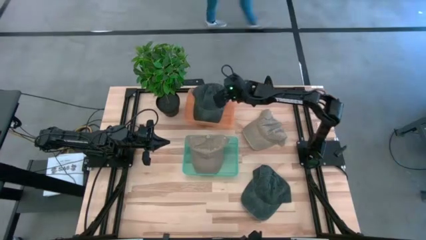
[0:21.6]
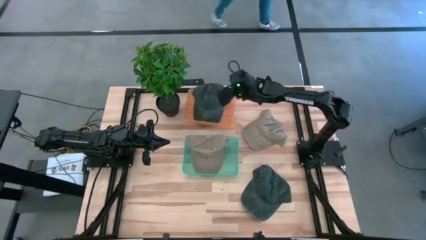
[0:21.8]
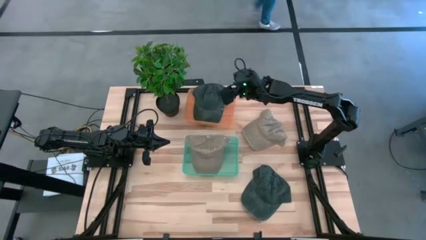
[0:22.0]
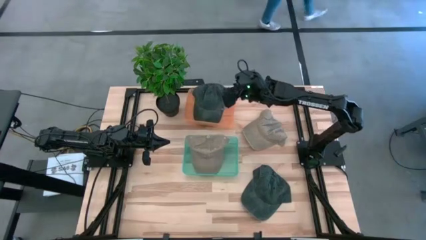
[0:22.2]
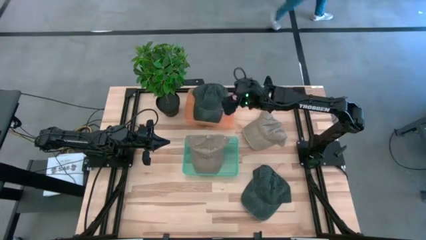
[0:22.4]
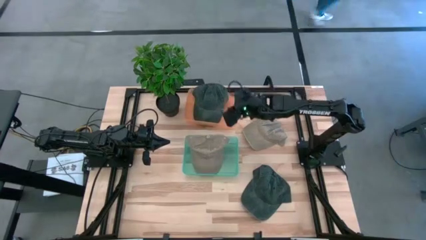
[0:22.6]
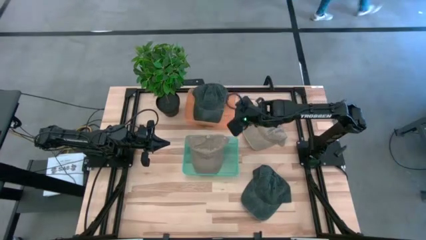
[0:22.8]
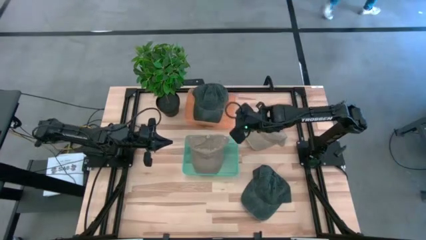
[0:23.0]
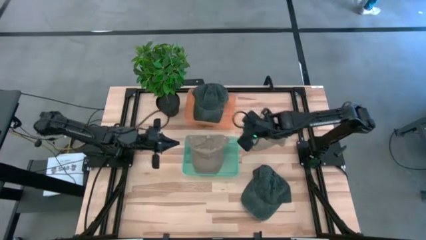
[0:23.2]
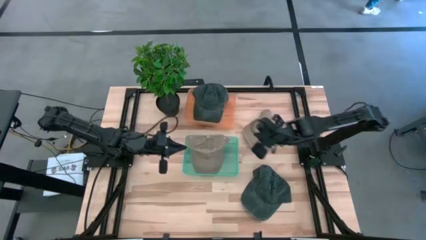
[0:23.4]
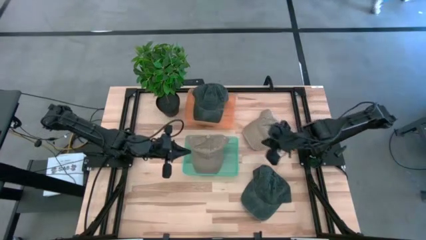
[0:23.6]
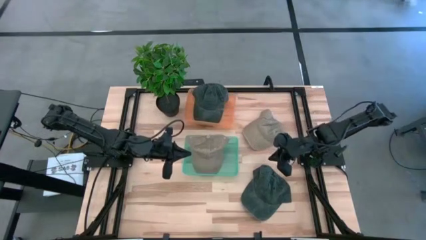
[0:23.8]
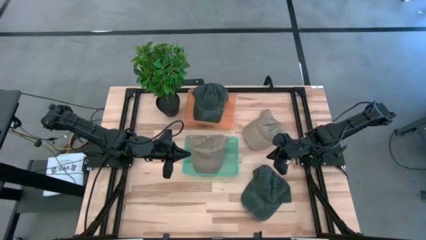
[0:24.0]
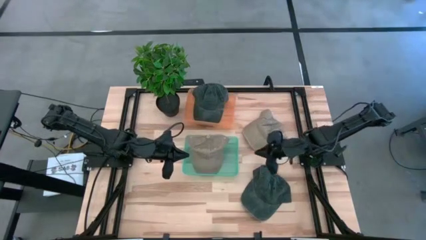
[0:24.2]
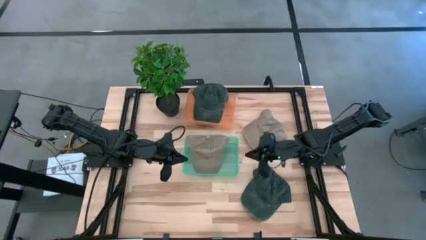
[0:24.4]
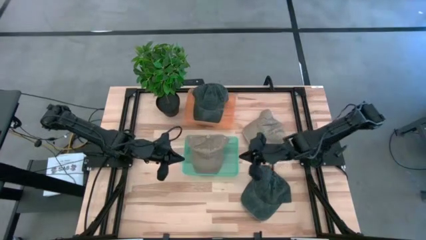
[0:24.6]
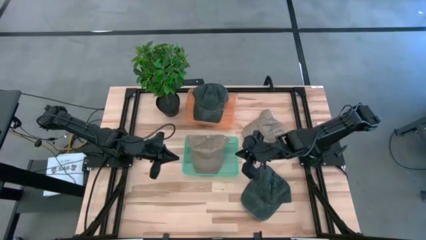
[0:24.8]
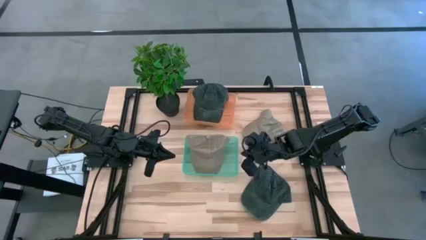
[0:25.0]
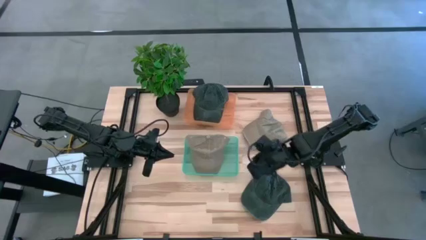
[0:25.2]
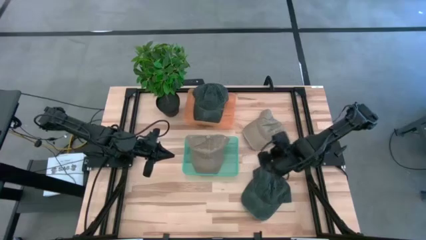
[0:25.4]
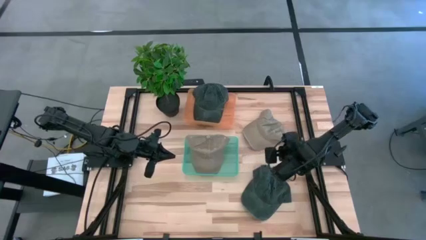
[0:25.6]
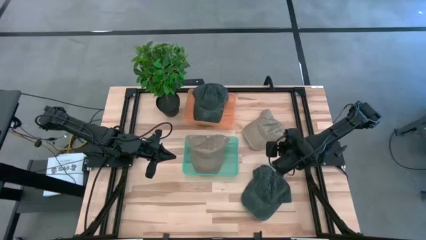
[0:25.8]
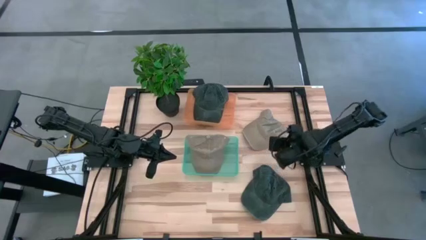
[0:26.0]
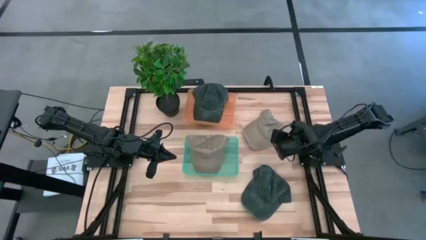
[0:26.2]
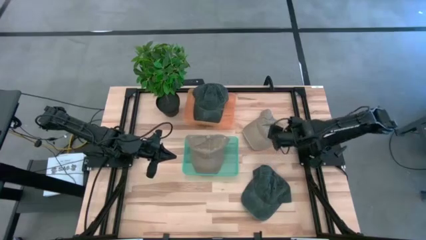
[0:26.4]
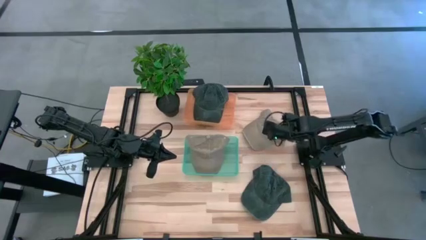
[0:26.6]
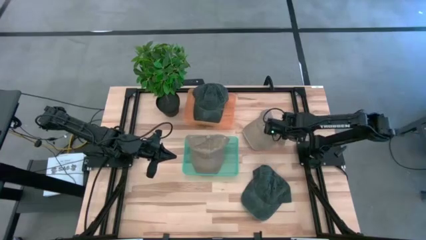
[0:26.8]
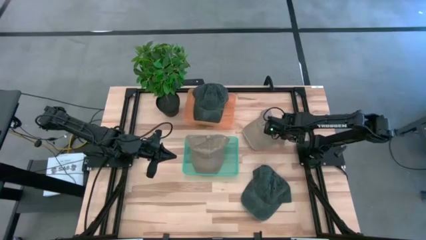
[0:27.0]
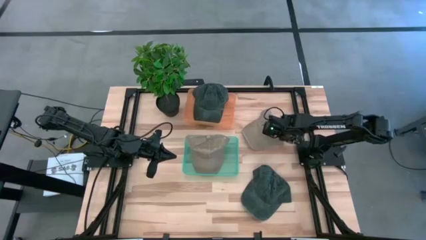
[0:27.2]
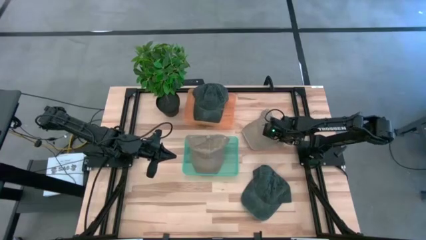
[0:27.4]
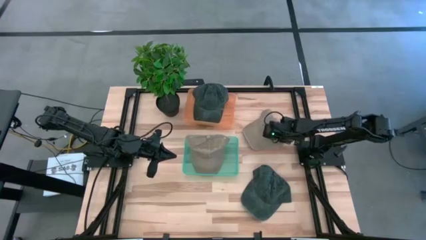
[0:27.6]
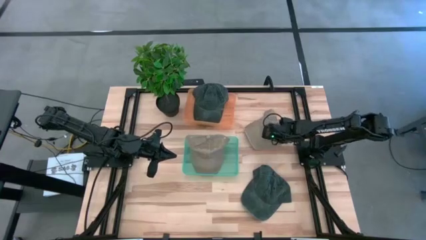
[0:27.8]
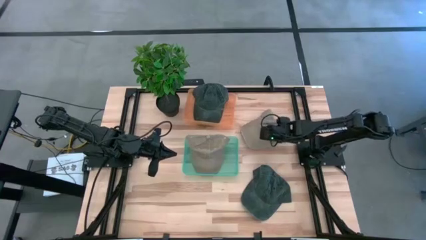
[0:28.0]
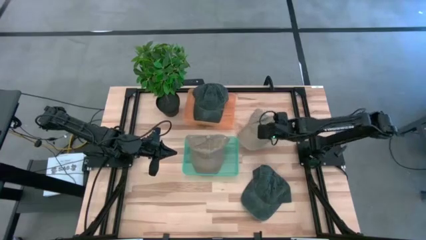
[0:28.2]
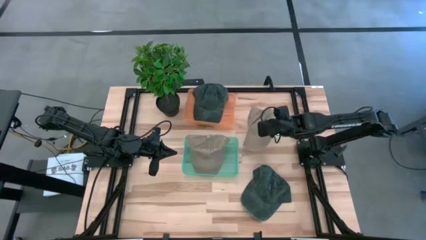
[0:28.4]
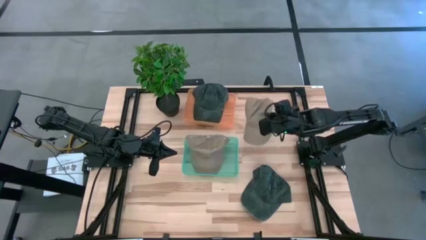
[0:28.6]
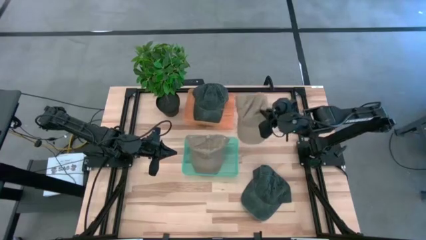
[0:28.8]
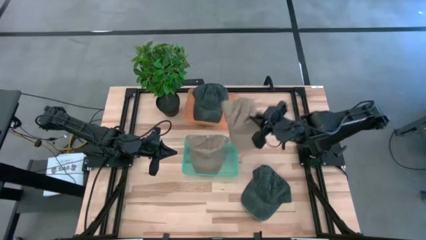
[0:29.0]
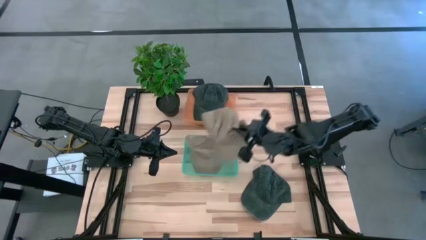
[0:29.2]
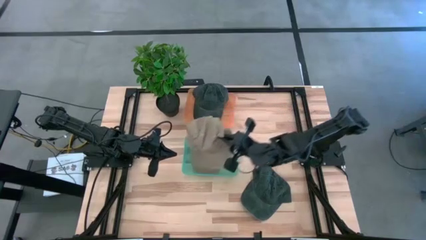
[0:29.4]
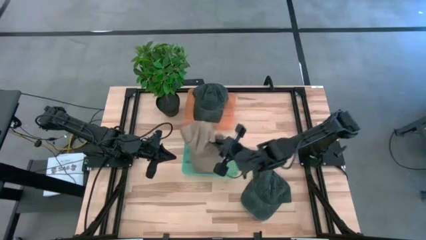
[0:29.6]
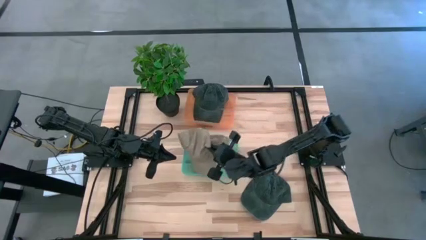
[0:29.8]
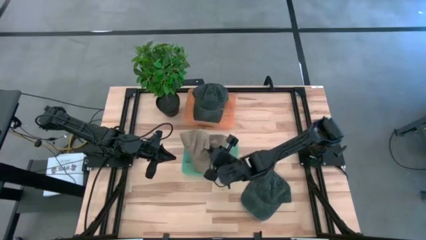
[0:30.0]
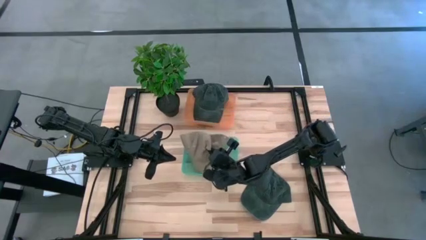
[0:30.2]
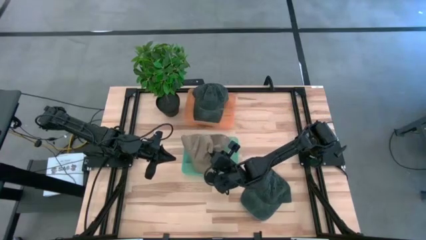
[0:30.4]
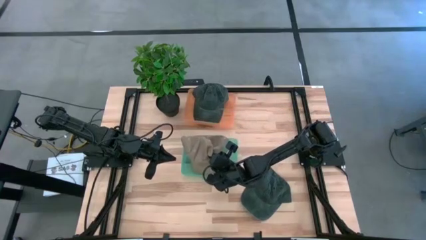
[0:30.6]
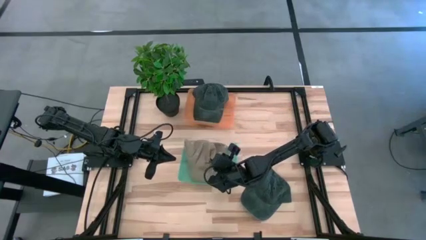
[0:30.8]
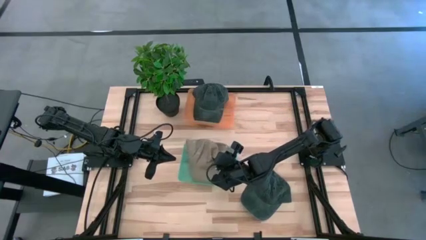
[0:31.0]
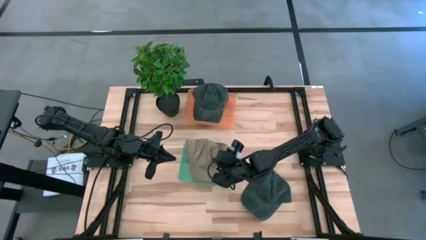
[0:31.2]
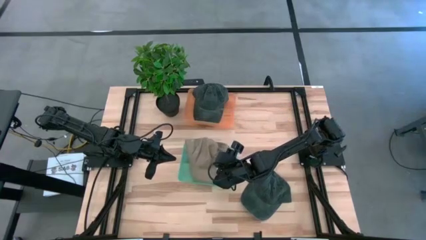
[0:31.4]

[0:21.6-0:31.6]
Task: Pick & Place hat
Put the brown cap into the green bin

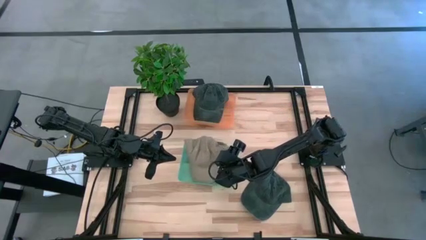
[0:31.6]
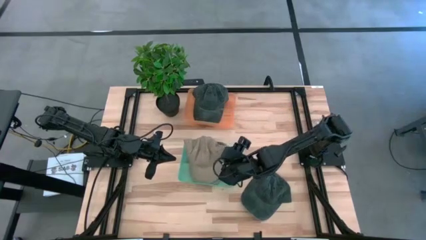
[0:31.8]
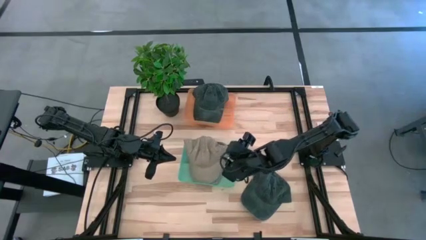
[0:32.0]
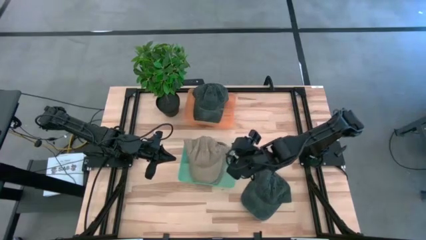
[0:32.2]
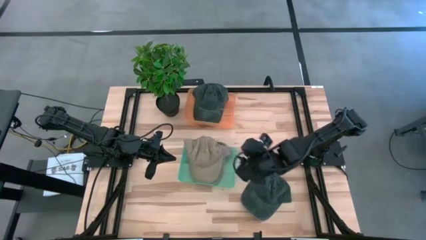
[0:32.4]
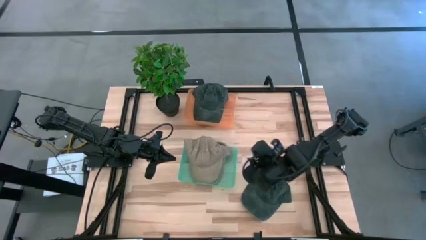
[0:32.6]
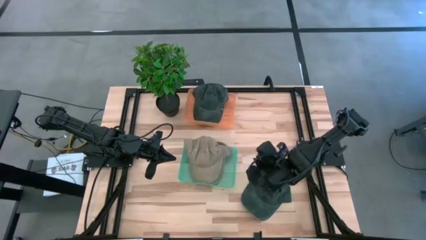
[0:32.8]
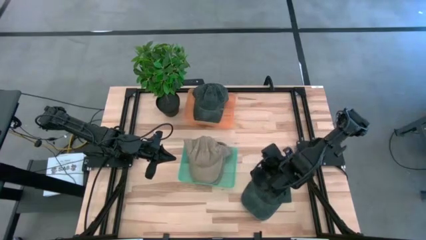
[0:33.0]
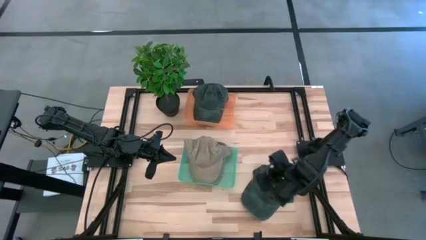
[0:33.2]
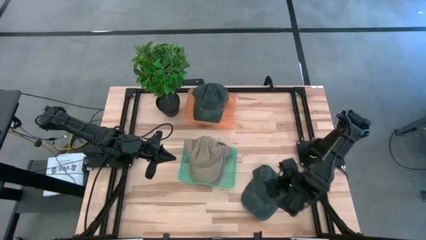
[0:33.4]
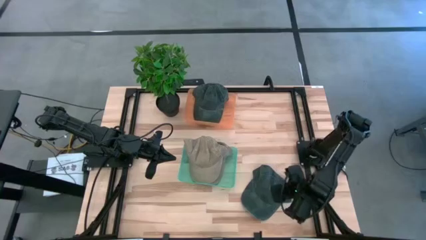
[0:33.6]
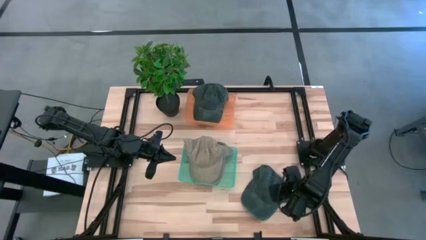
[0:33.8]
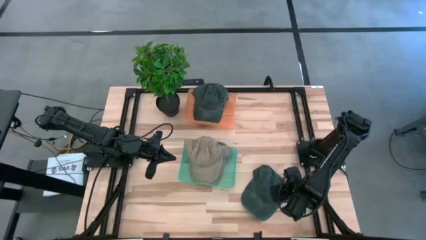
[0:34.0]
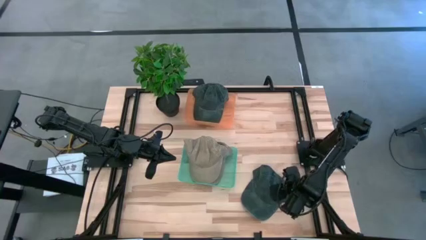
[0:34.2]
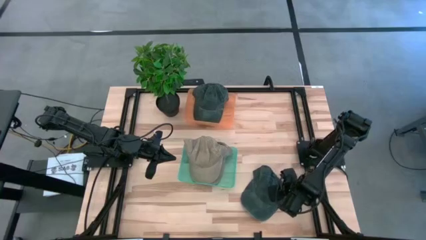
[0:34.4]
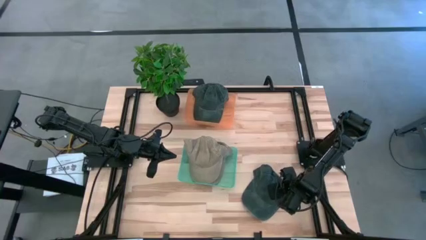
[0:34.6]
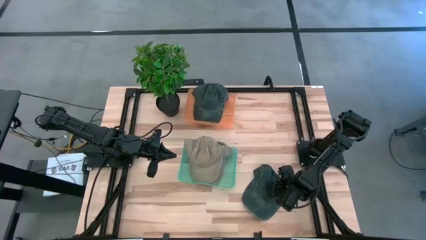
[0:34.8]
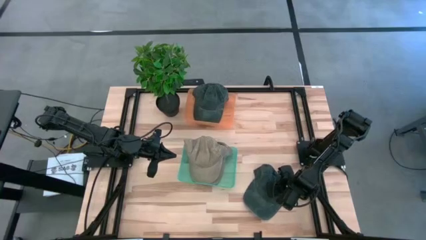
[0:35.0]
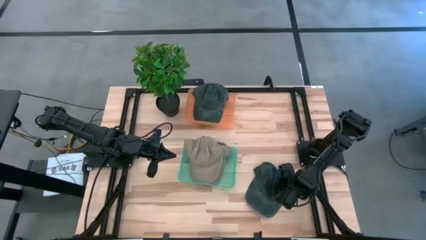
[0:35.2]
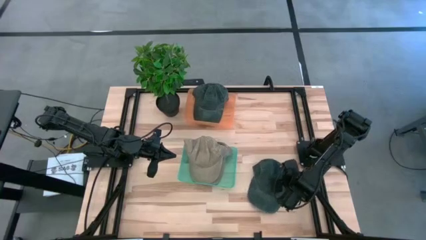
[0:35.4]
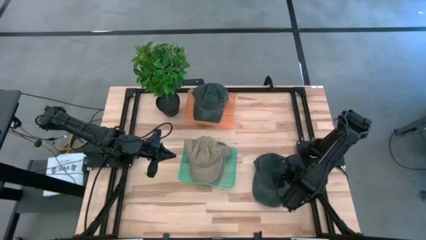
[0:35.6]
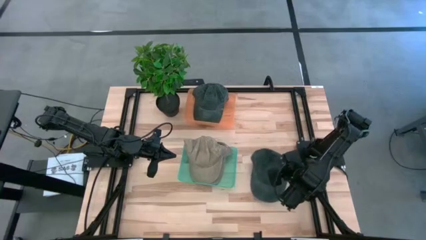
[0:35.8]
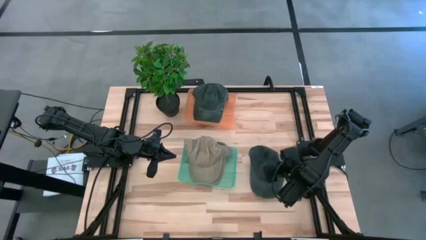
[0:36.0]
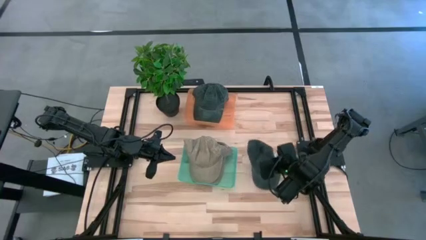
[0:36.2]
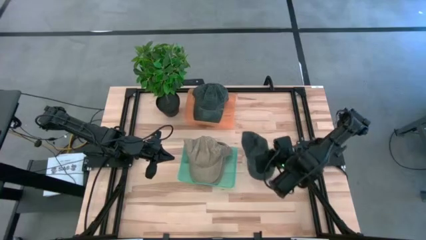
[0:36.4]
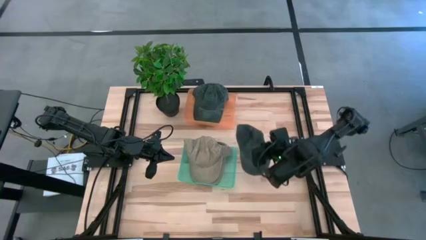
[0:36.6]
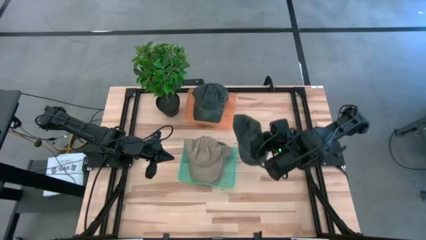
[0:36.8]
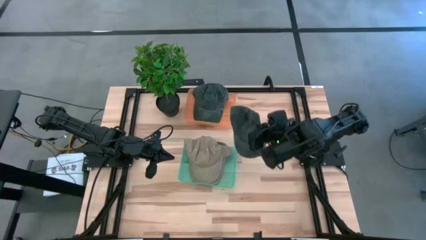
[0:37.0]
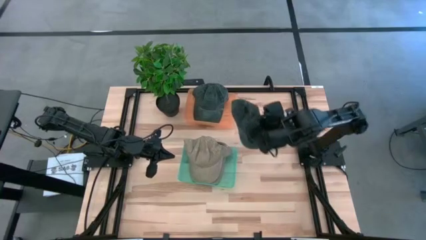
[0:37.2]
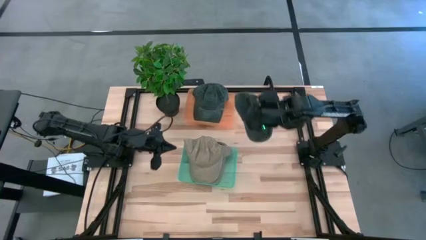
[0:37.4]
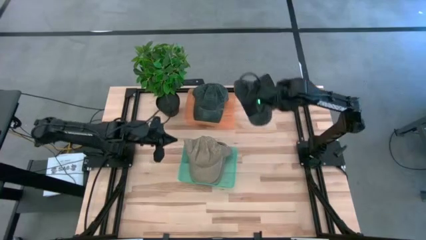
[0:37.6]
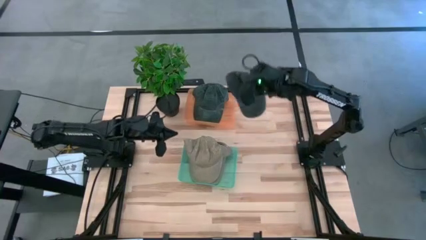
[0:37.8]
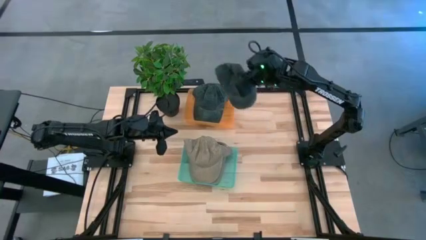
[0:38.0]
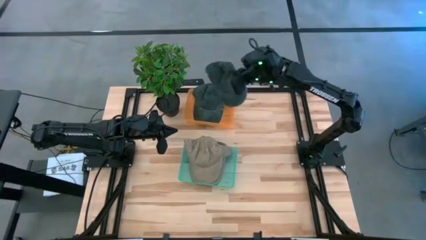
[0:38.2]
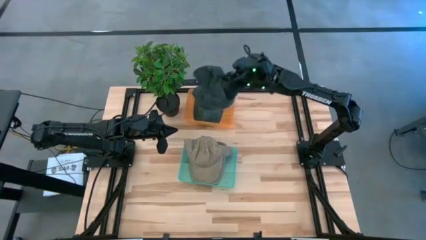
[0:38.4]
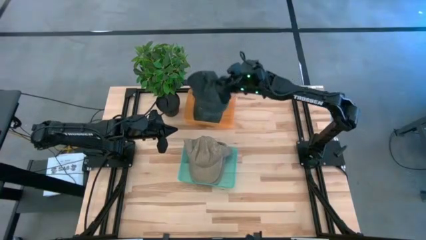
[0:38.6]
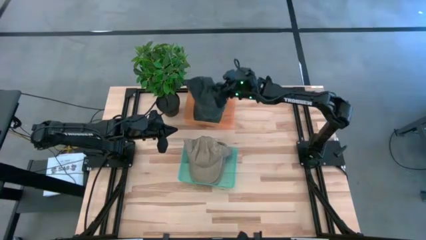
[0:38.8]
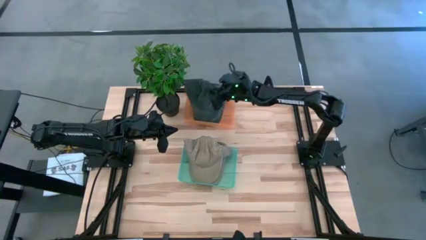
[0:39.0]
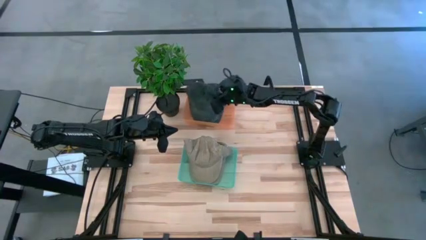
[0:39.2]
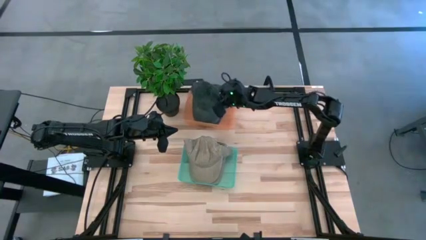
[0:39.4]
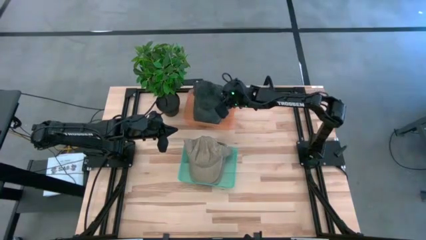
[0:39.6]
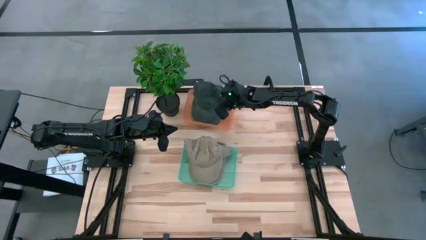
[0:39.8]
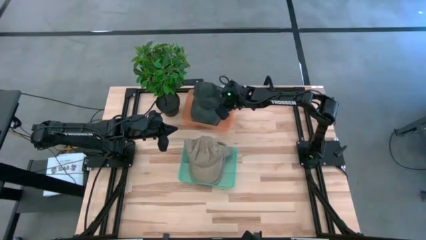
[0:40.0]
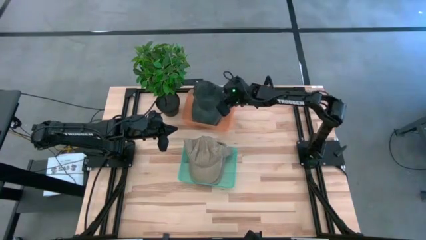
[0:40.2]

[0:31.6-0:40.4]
Put the black cap into the orange bin
